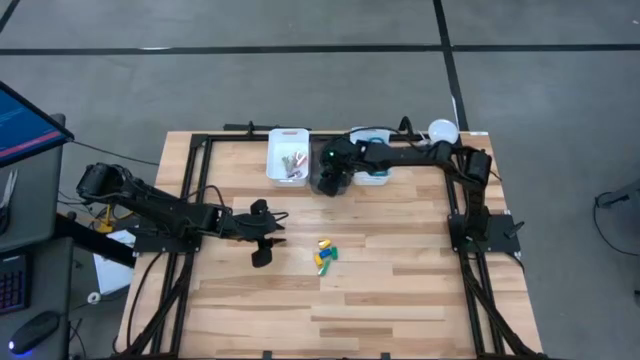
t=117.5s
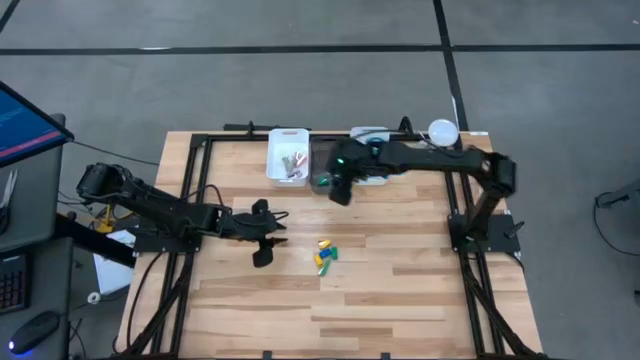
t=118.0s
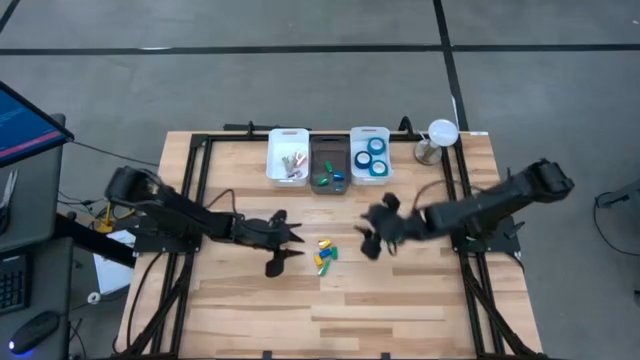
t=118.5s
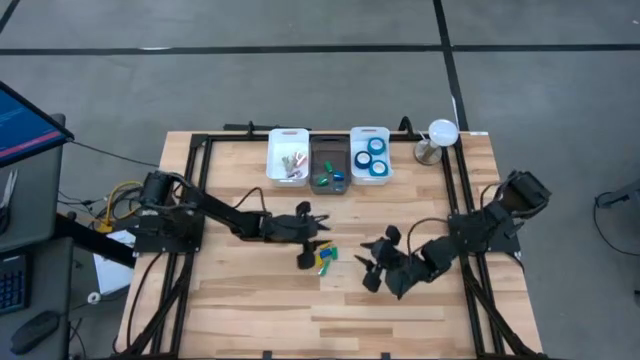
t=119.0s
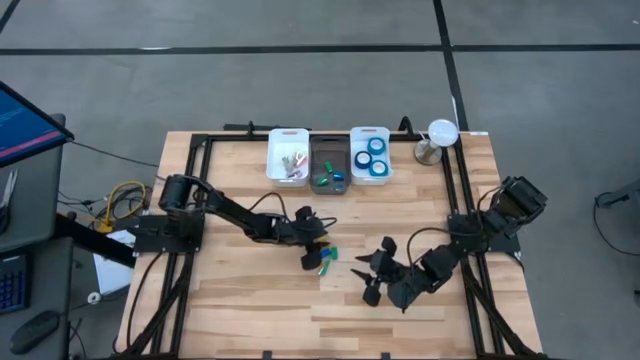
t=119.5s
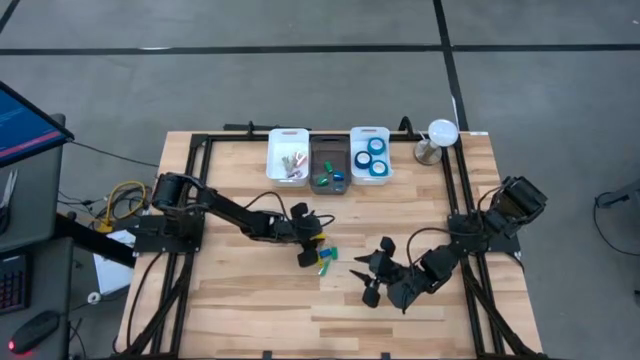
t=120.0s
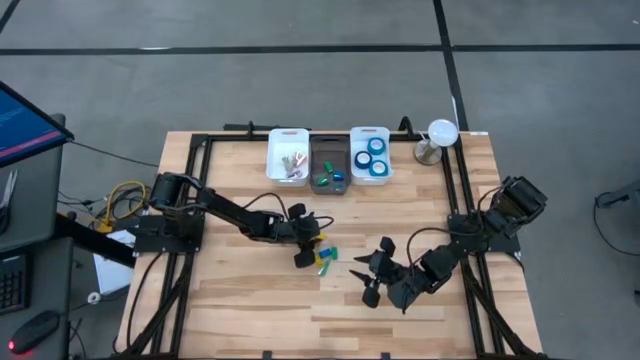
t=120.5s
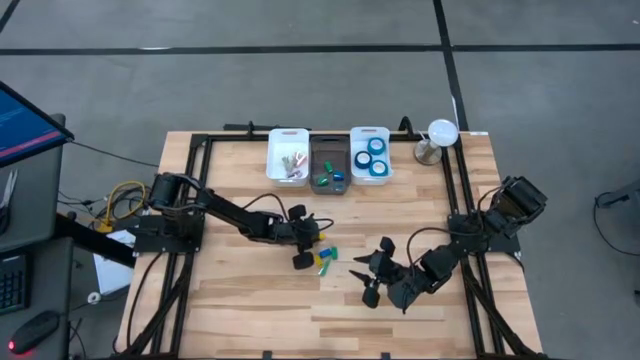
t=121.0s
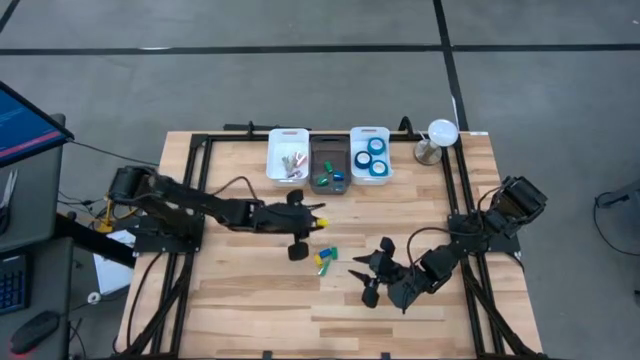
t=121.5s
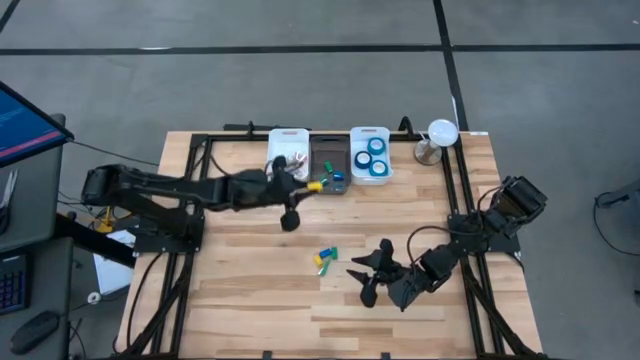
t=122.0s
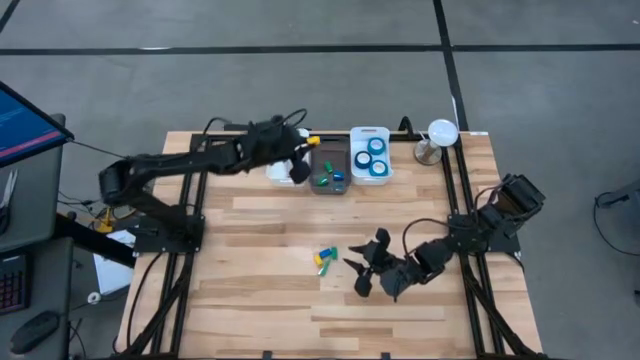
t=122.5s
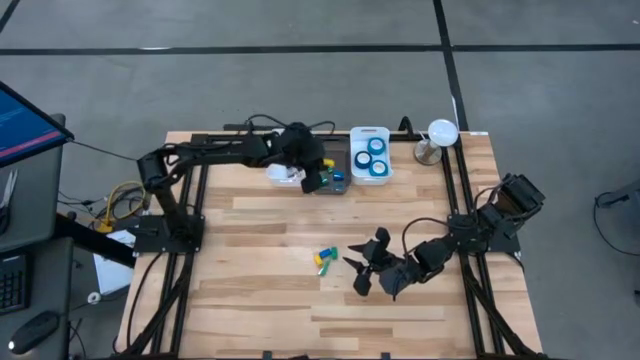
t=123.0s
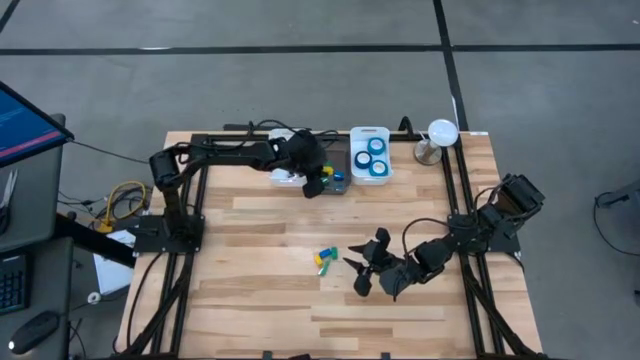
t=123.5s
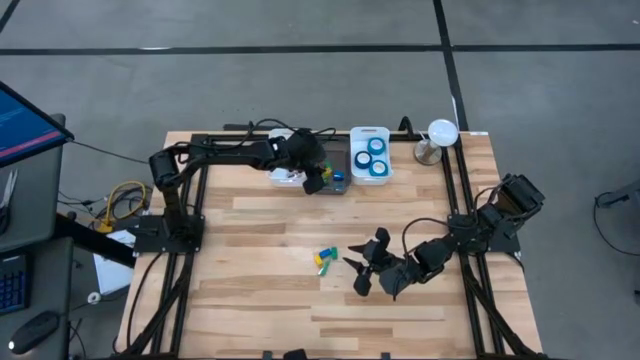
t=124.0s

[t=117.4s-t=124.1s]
Task: Pick and place Stapler, Stapler remover, tape
Put the yellow stapler into the black bin

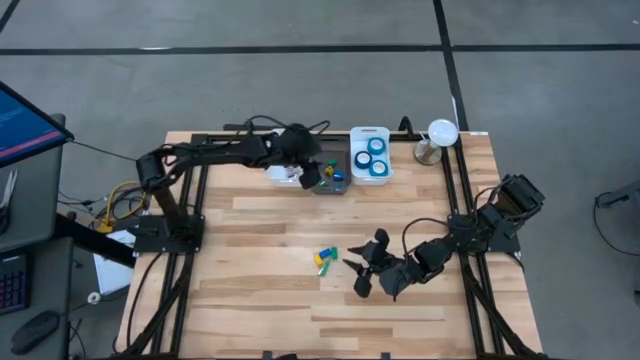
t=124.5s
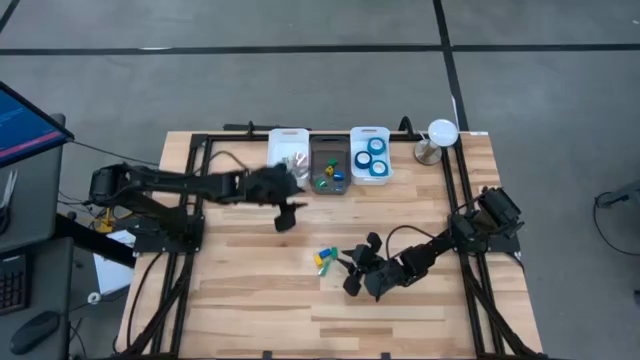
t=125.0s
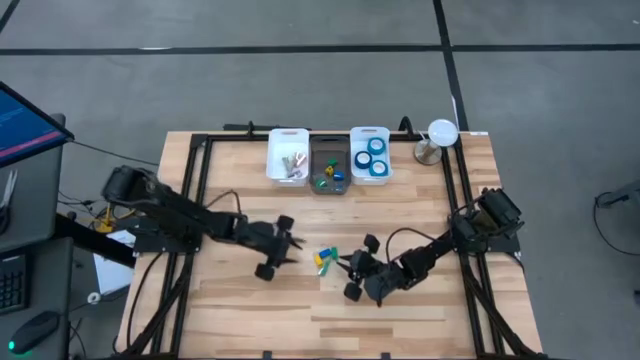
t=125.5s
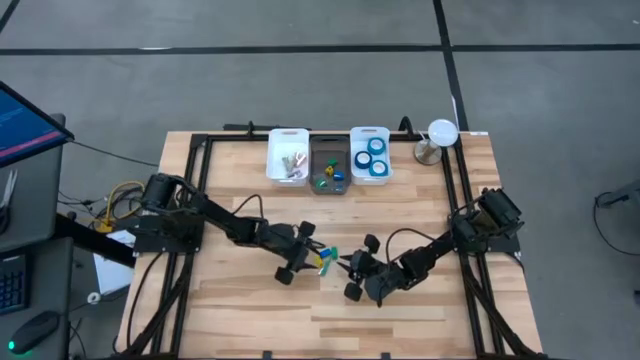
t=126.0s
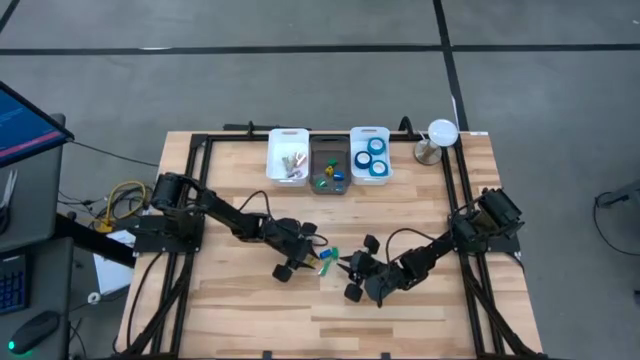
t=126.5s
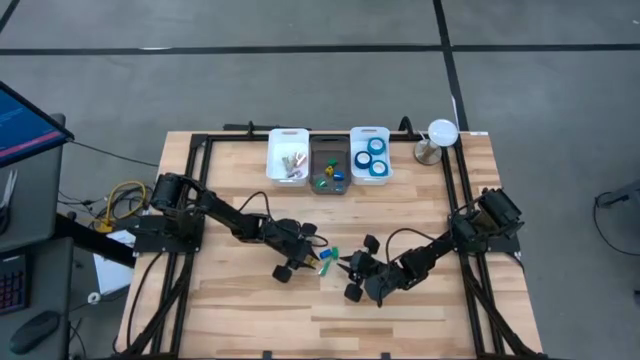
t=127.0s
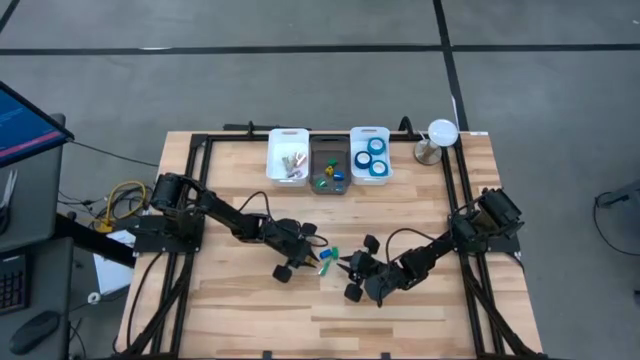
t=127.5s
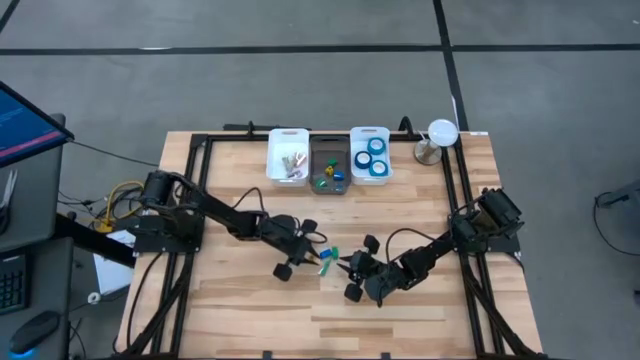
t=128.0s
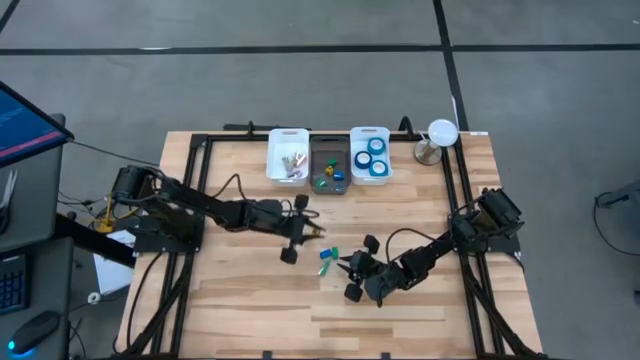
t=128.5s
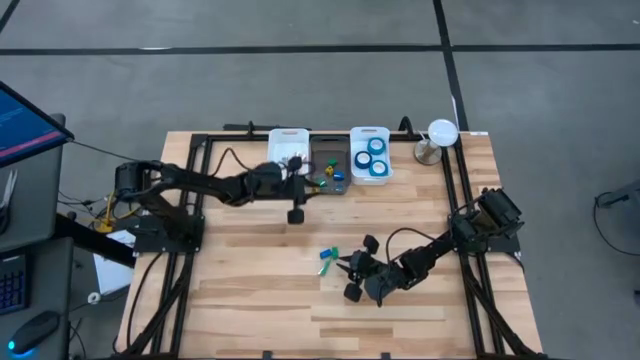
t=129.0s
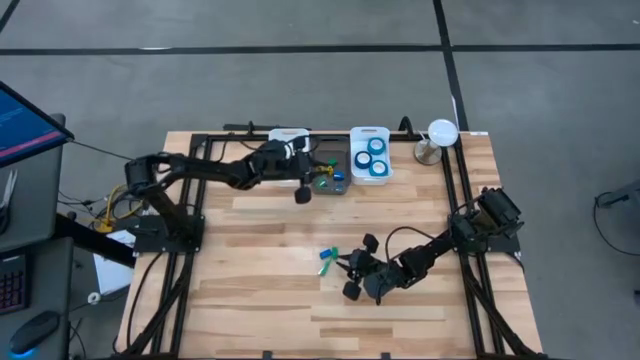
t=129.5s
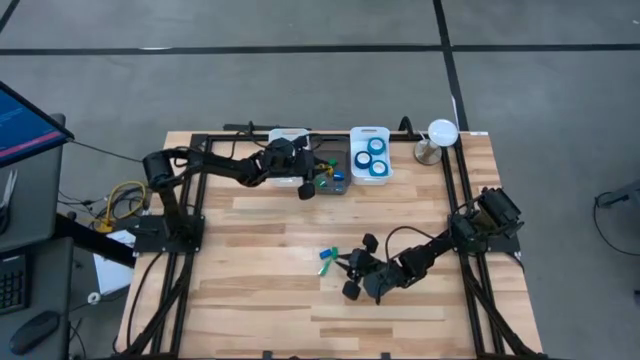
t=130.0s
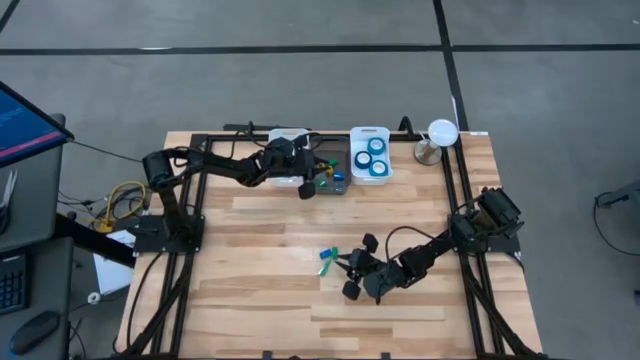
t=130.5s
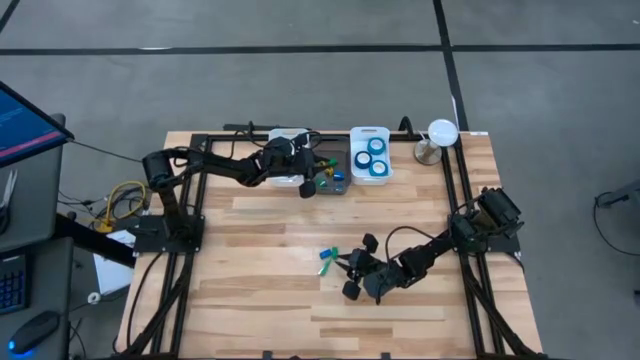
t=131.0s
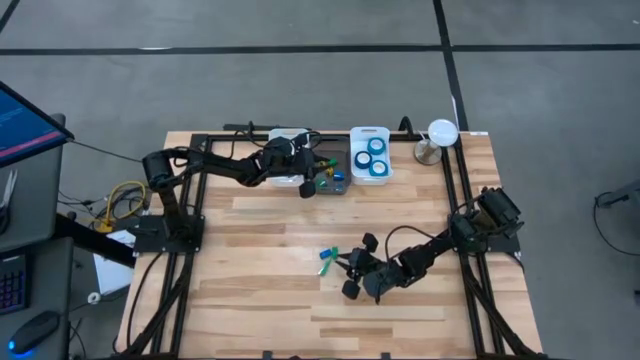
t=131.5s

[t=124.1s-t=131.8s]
Put the yellow stapler into the black bin

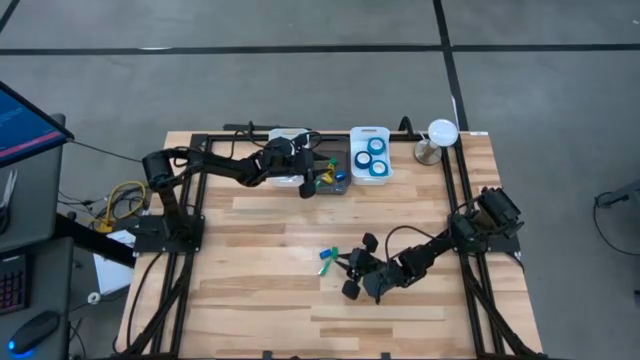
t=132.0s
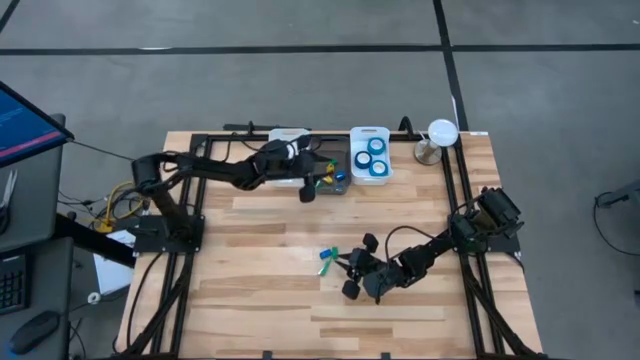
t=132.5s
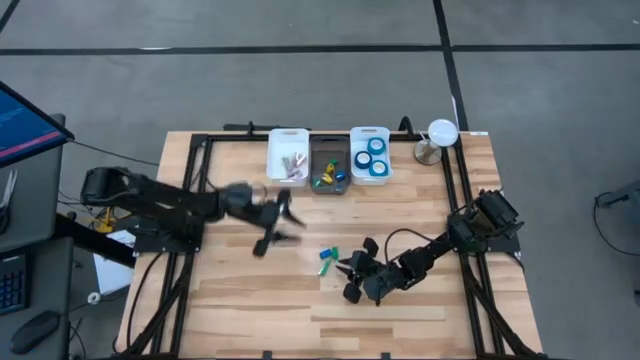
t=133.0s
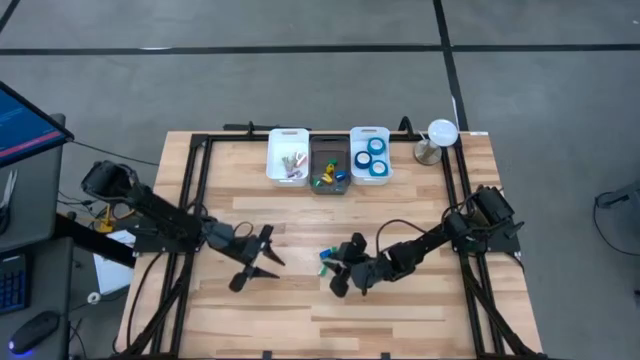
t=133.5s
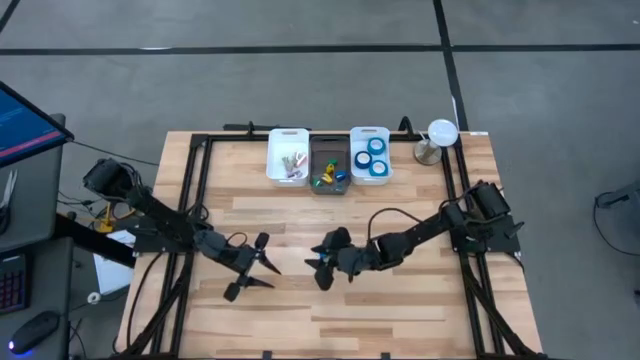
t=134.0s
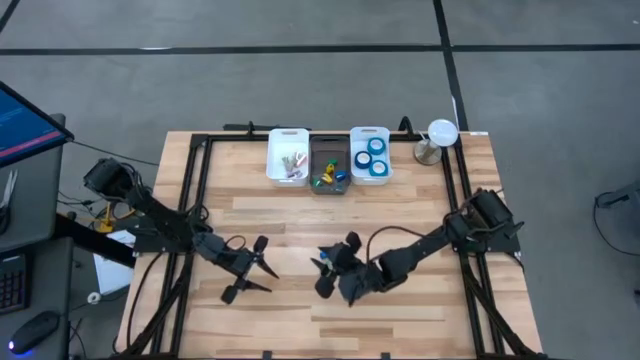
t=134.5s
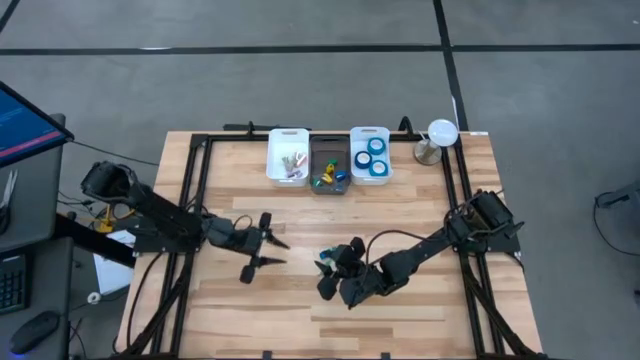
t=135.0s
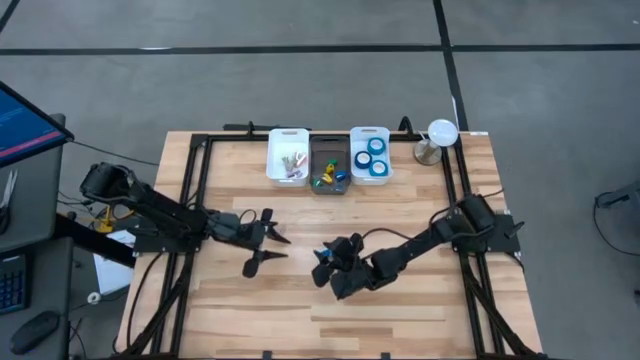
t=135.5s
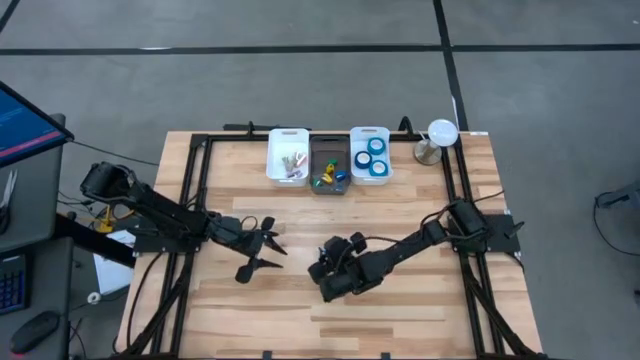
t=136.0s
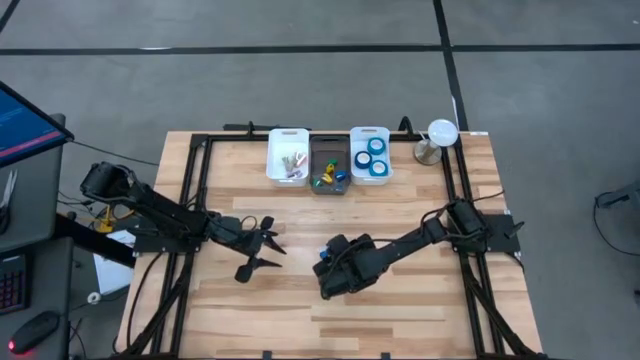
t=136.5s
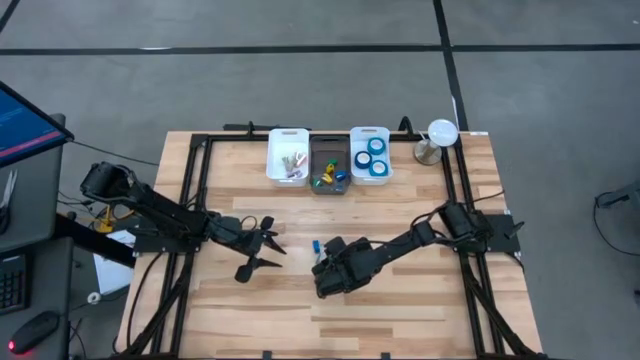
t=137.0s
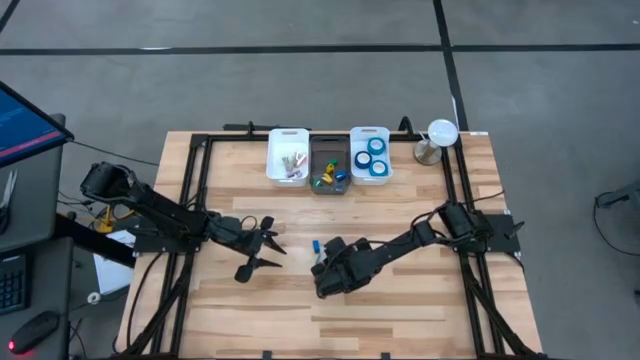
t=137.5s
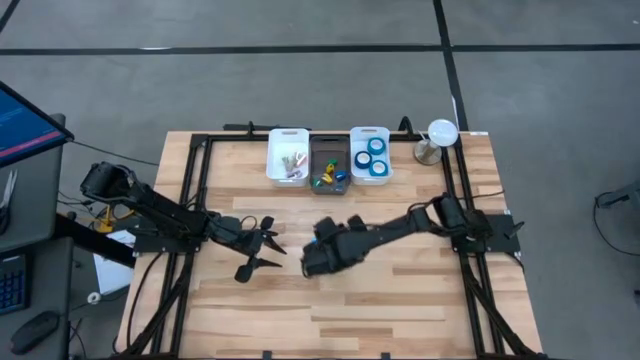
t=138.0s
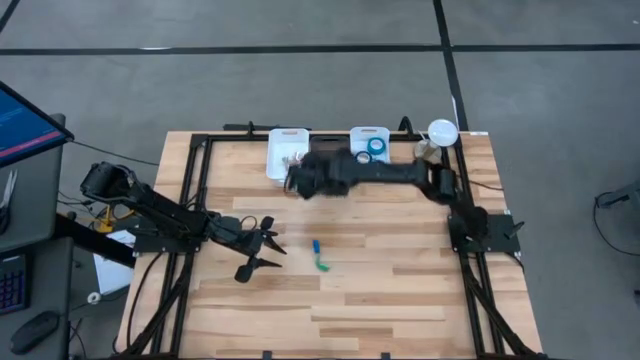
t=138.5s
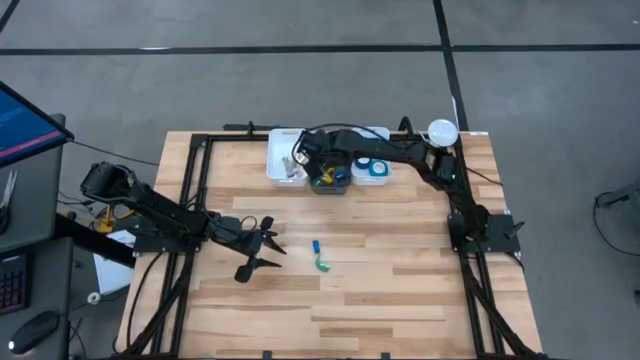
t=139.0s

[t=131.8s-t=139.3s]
Put the green stapler into the black bin
